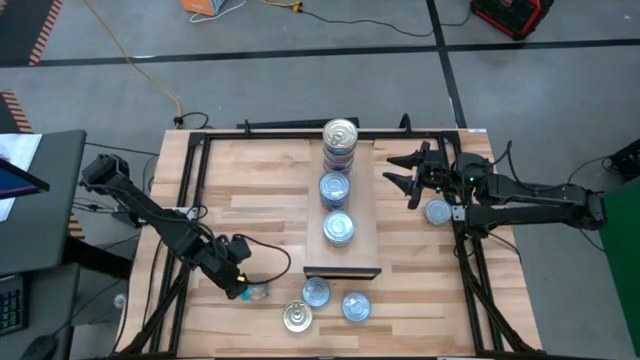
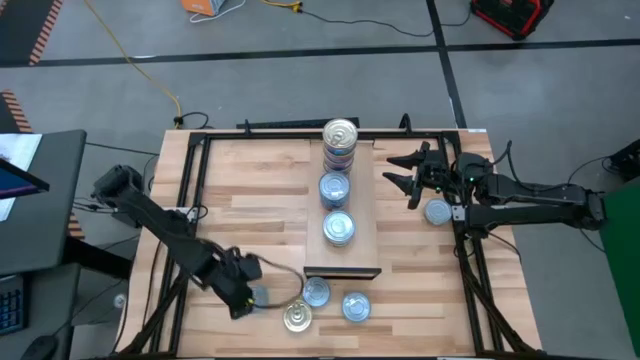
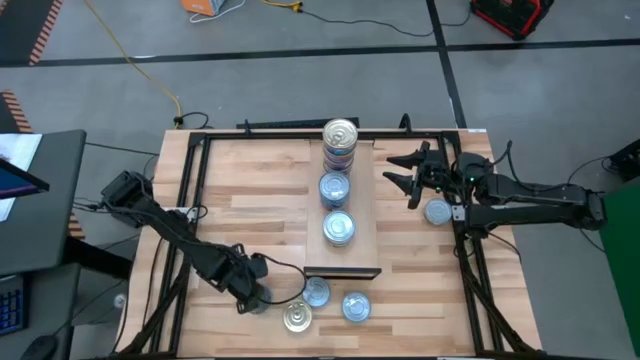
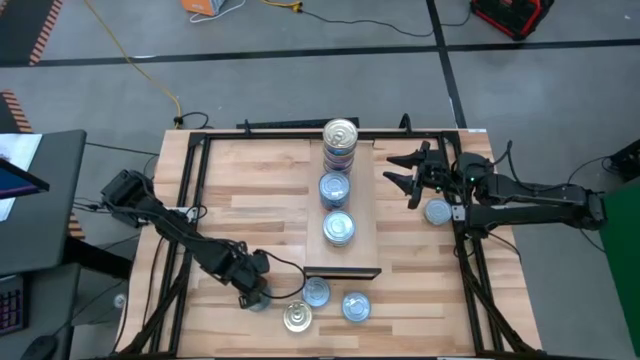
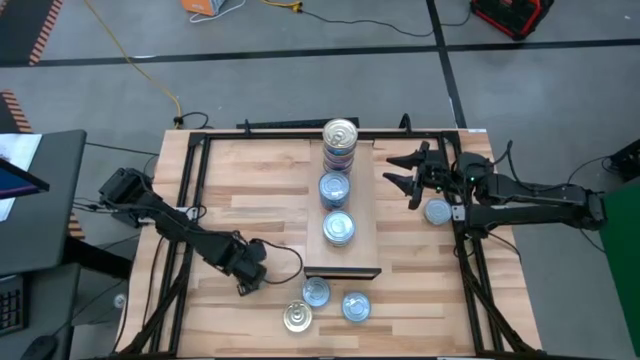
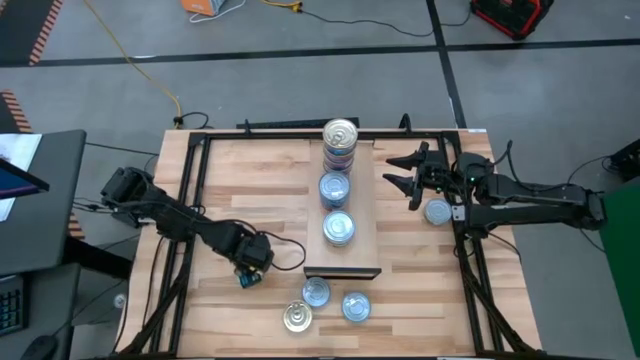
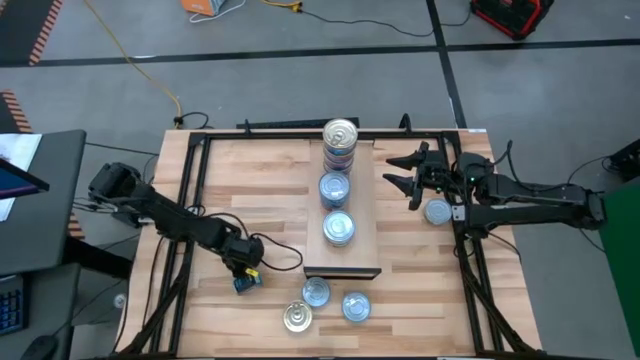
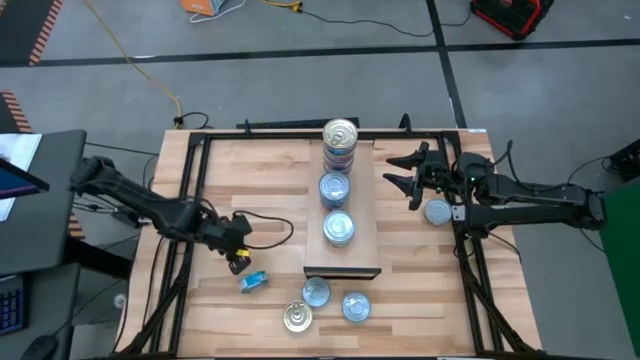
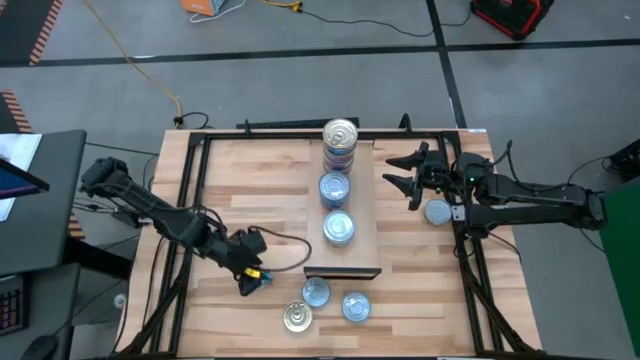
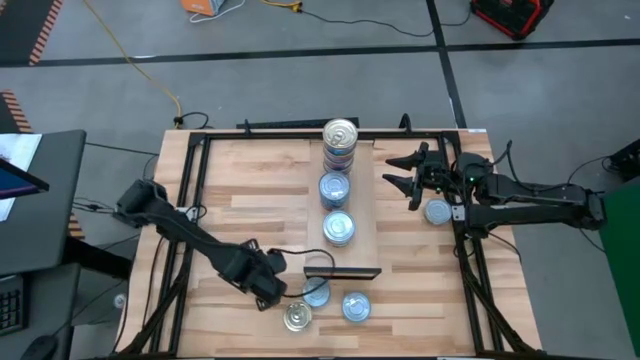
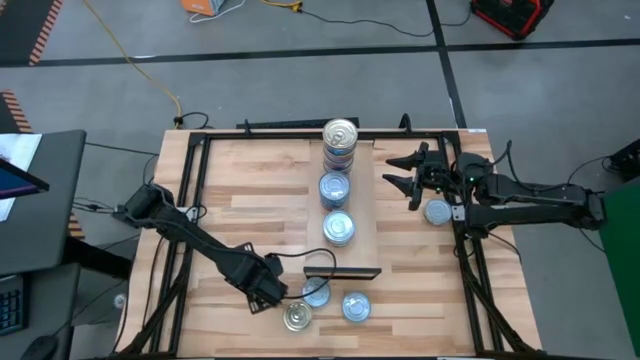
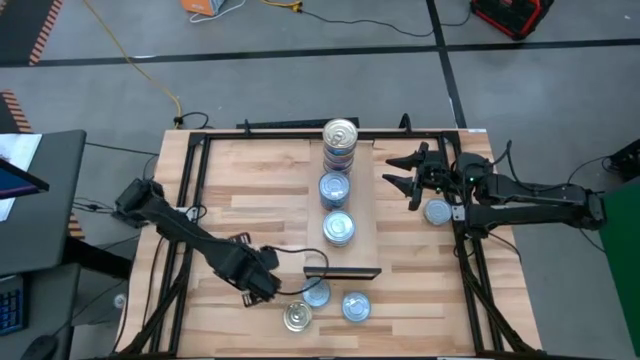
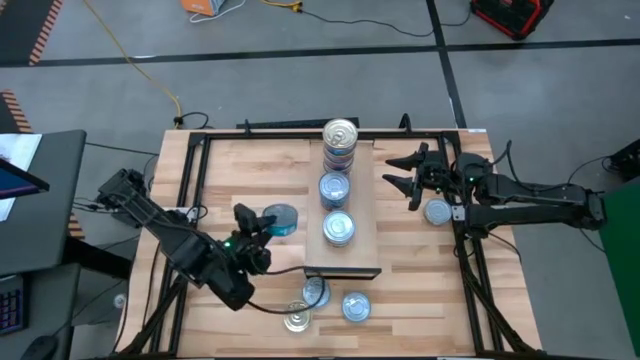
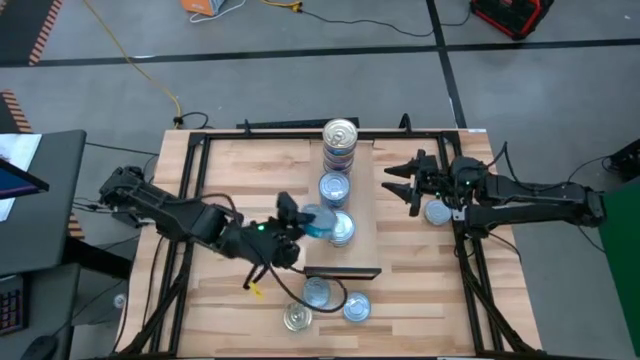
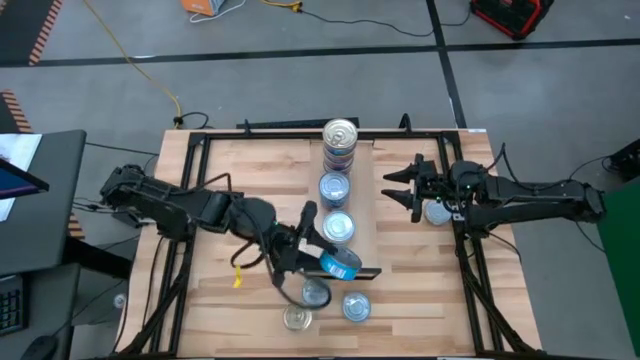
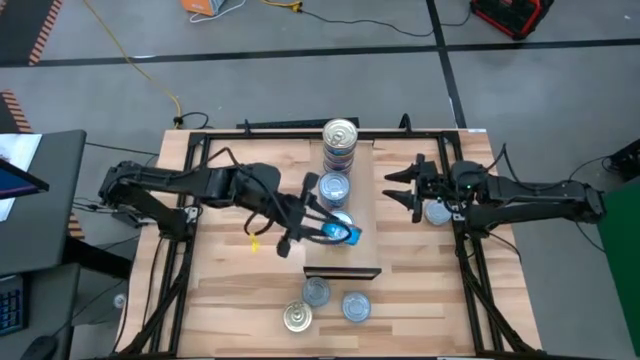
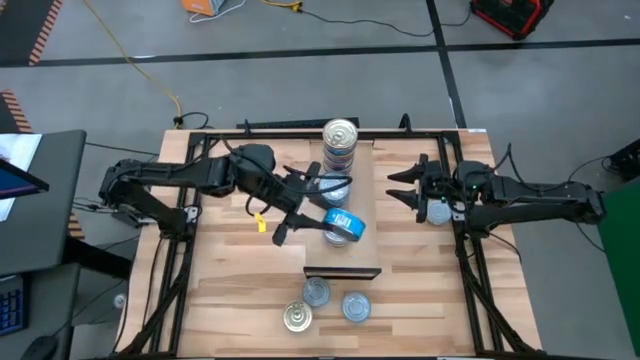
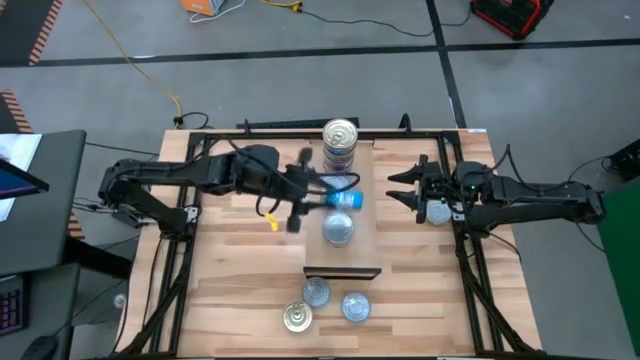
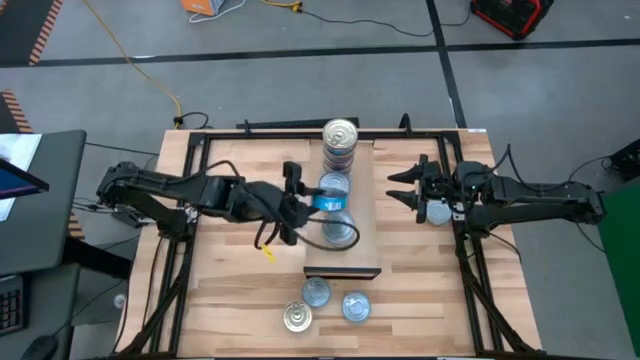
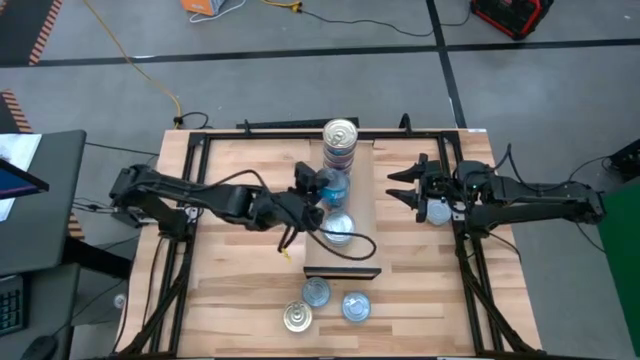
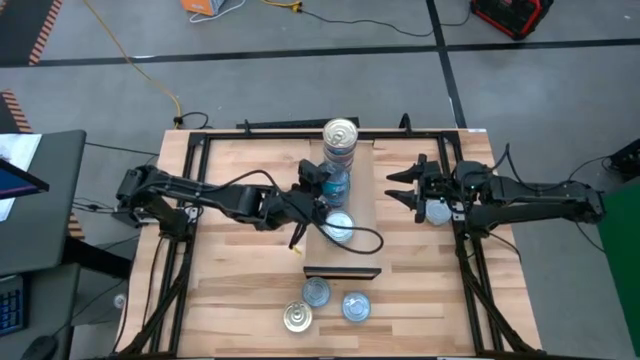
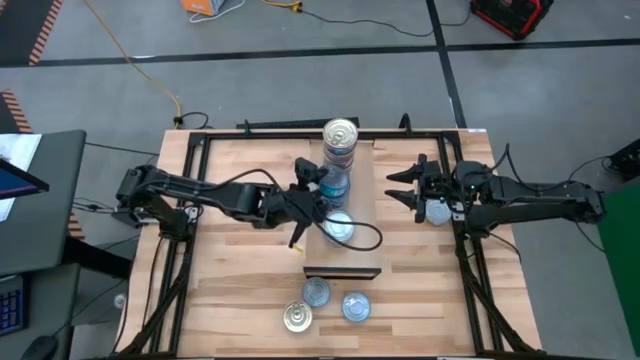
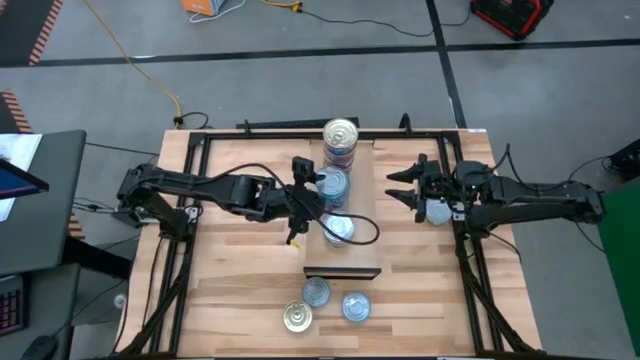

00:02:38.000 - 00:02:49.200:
Task: Stack canned seafood by type on shelf
Stack the yellow and blue tuna can on the shelf on top of the blue tuna can

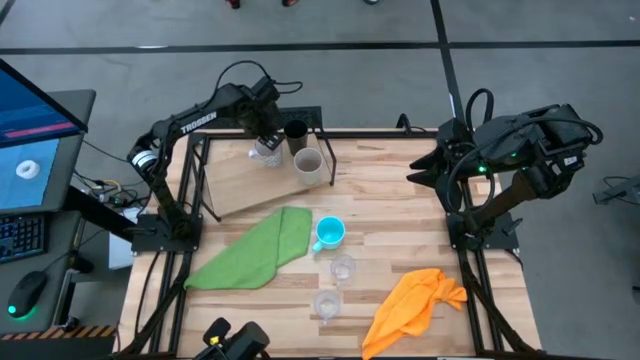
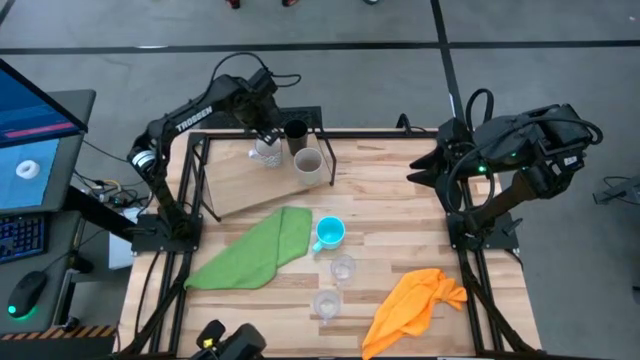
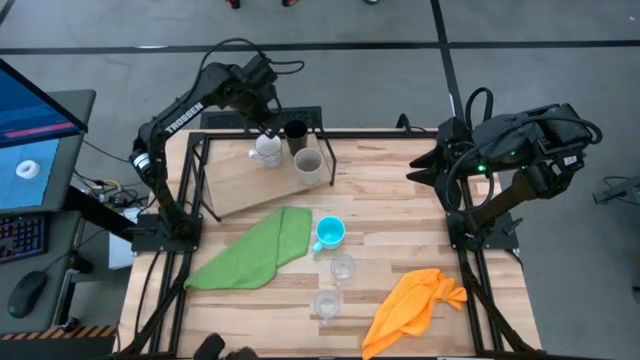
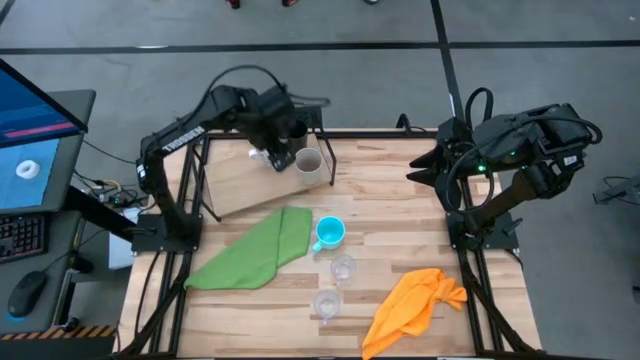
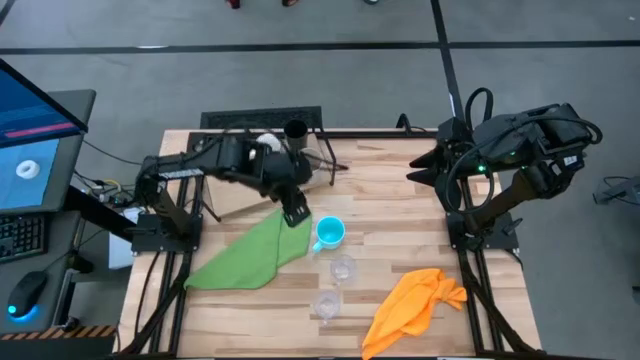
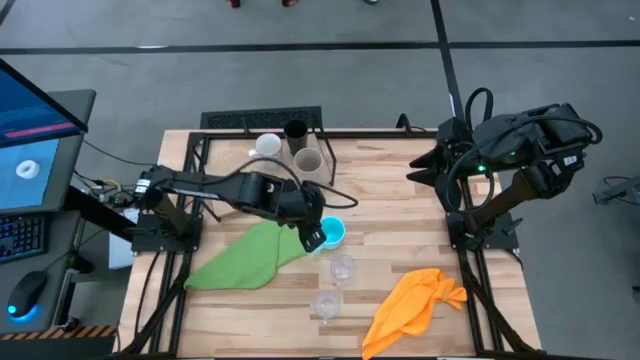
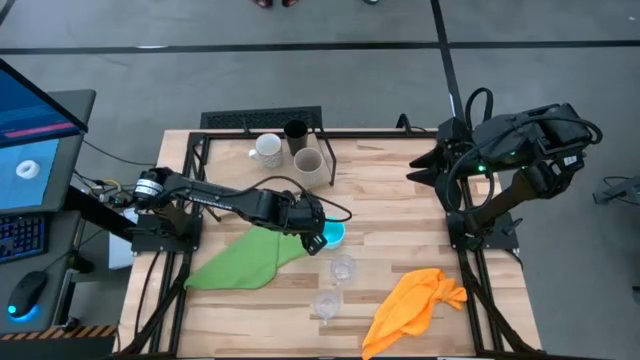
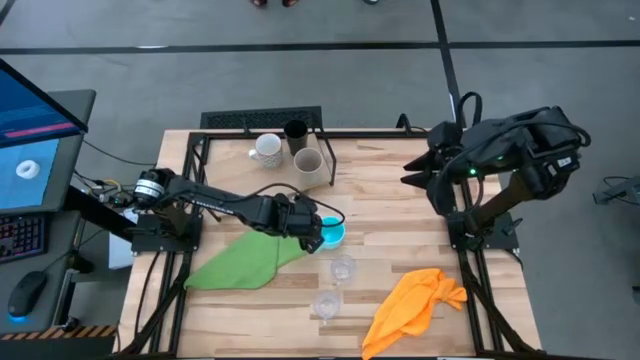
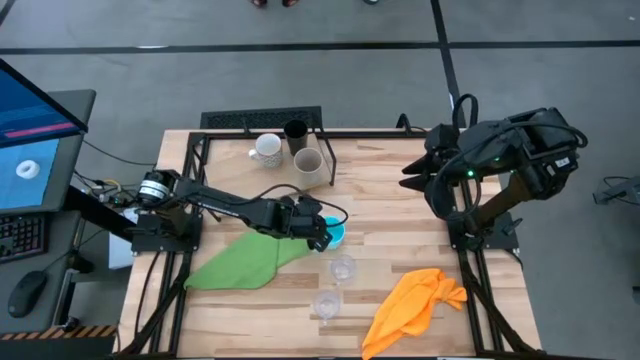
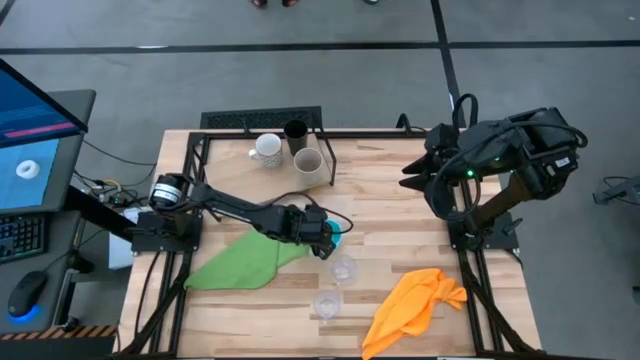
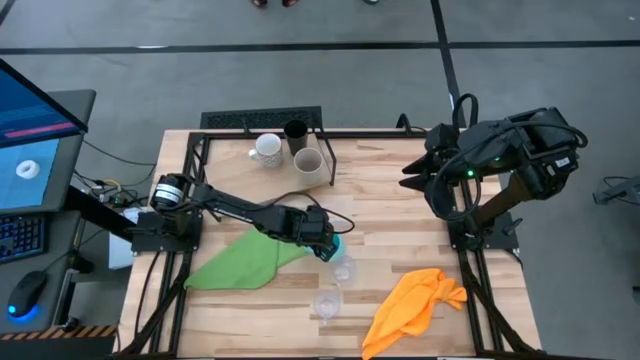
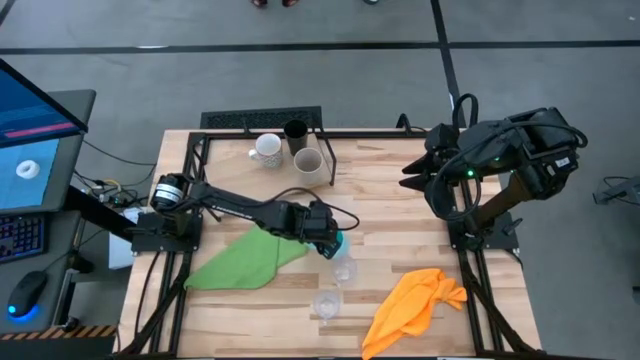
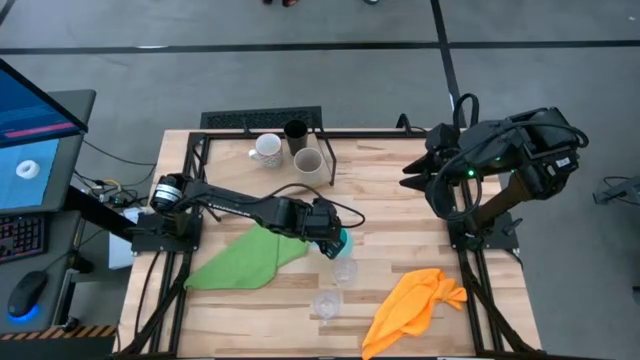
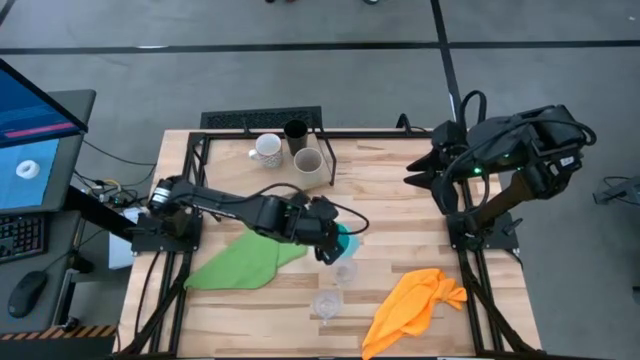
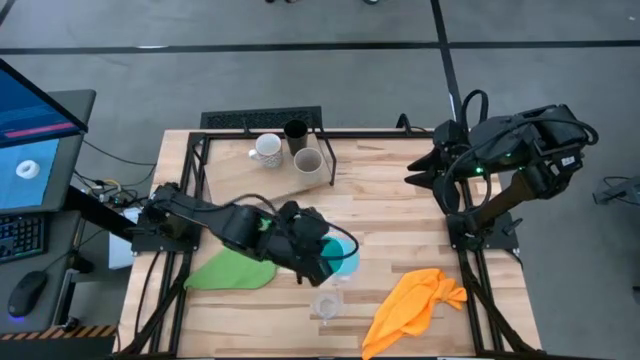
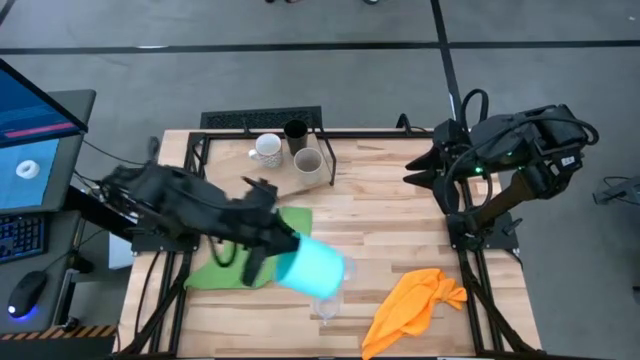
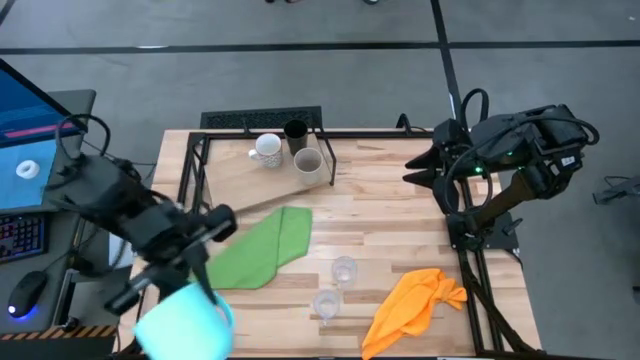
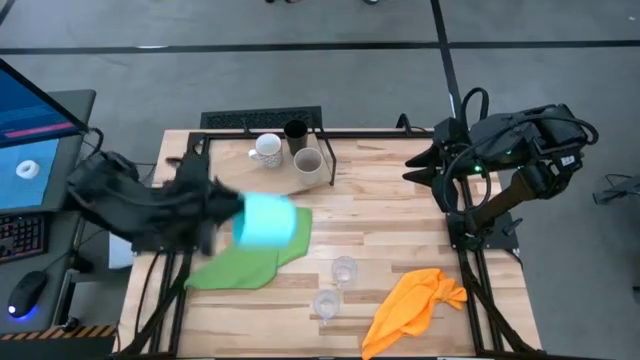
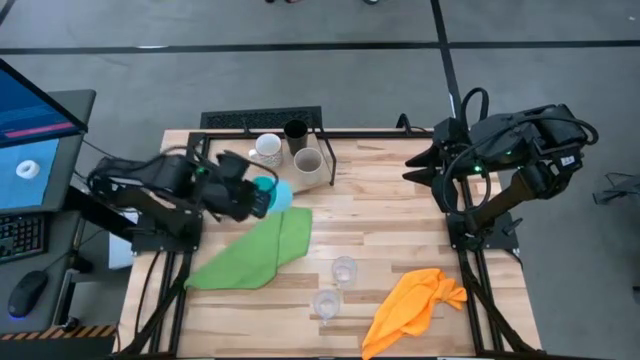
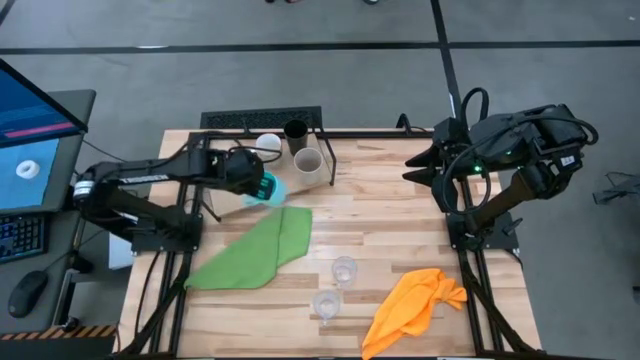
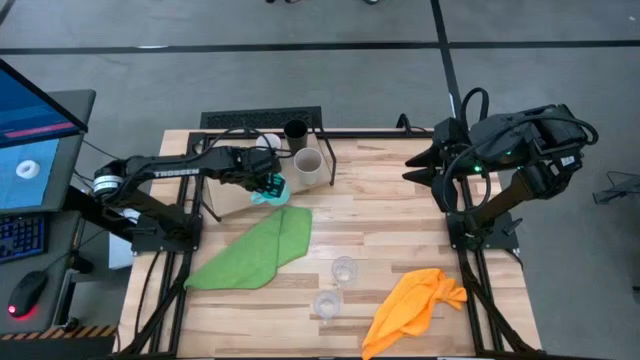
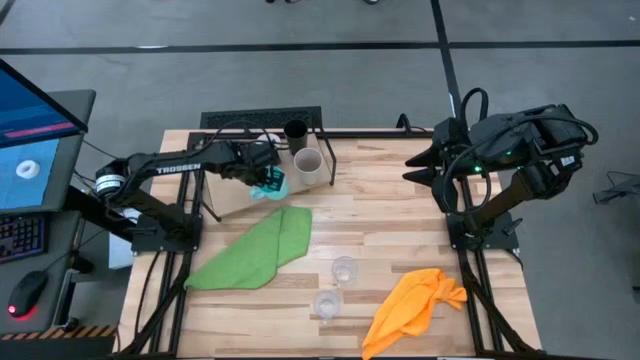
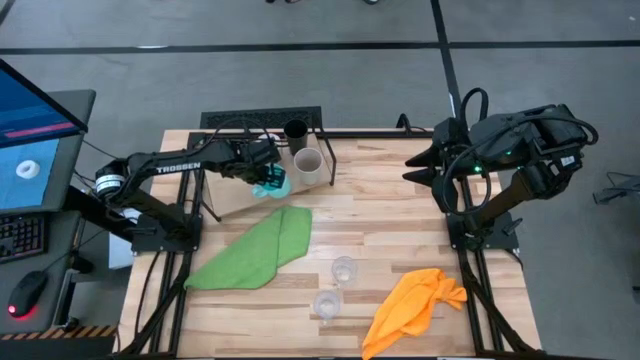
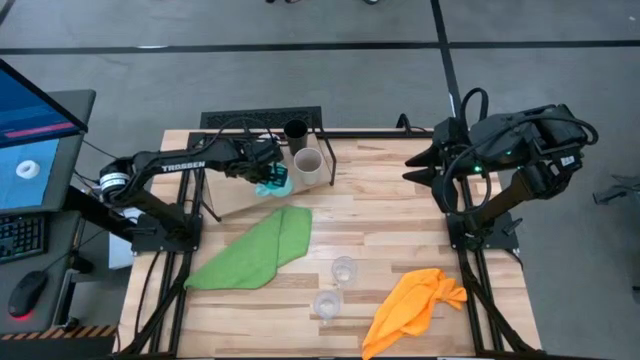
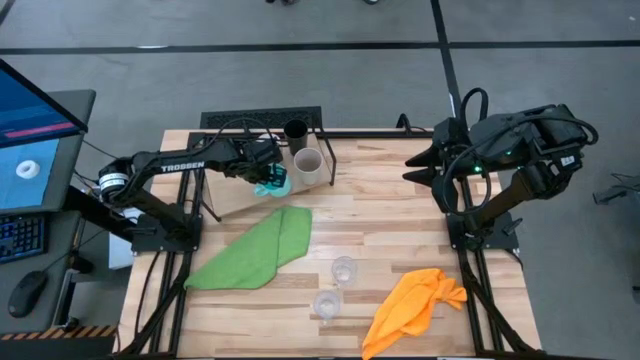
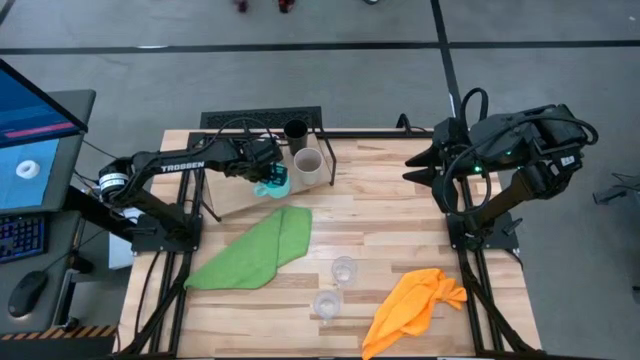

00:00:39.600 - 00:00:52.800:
Task: Stack small to large cups/mugs on shelf
Put the light blue mug on the shelf
